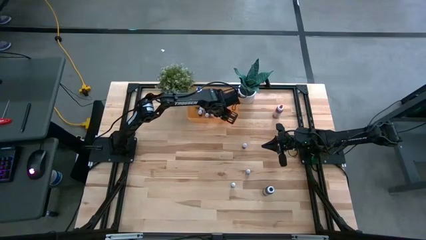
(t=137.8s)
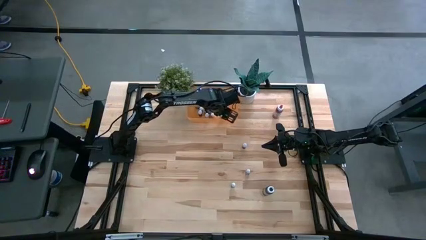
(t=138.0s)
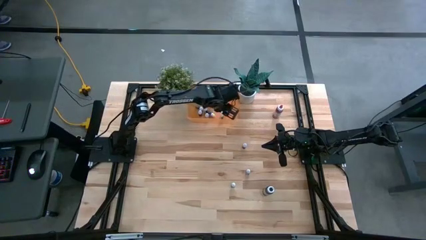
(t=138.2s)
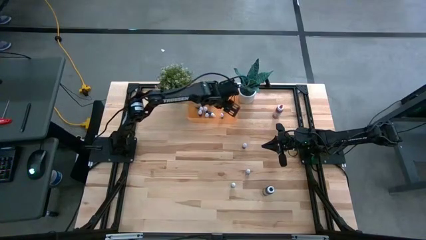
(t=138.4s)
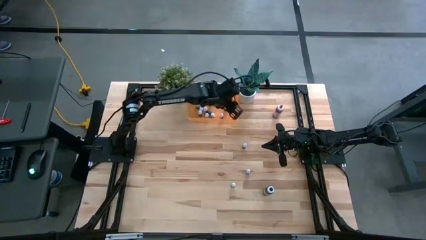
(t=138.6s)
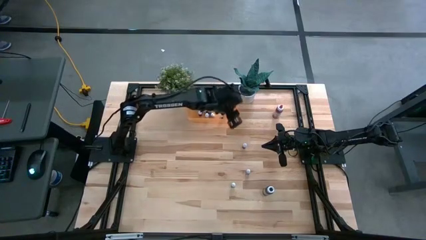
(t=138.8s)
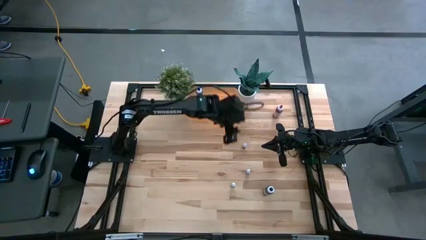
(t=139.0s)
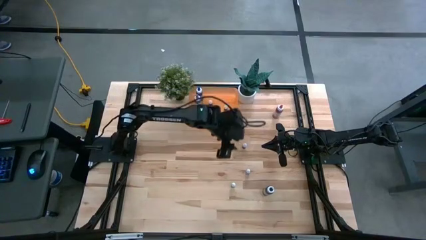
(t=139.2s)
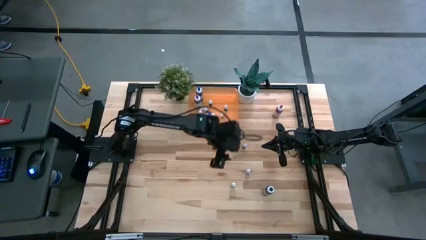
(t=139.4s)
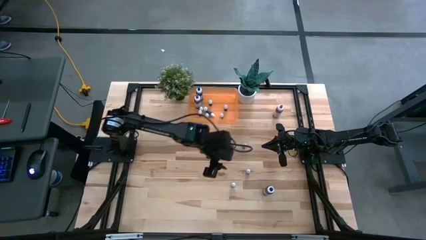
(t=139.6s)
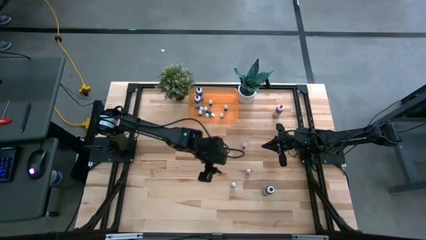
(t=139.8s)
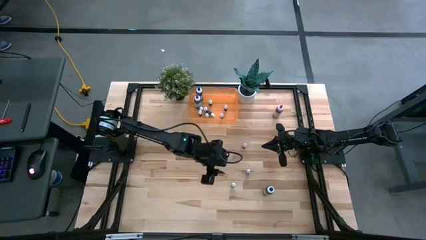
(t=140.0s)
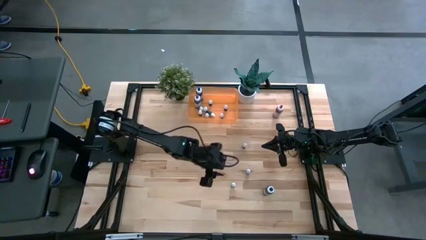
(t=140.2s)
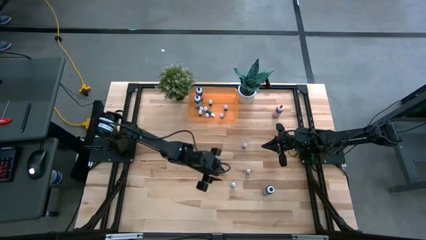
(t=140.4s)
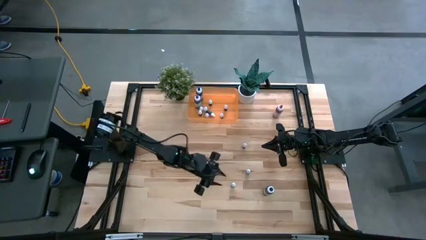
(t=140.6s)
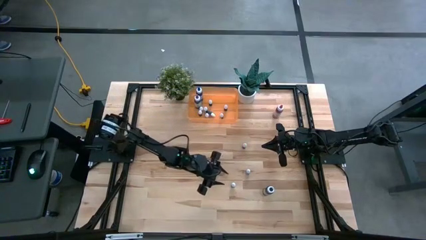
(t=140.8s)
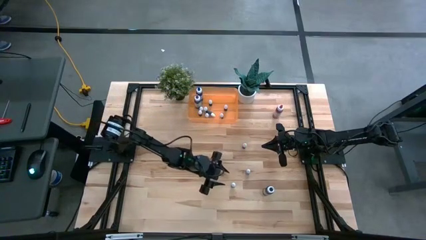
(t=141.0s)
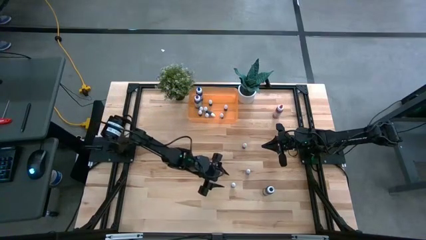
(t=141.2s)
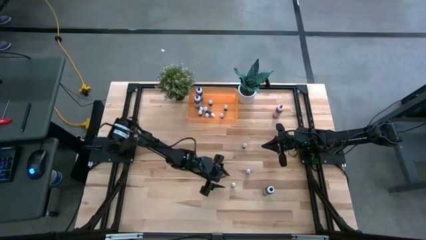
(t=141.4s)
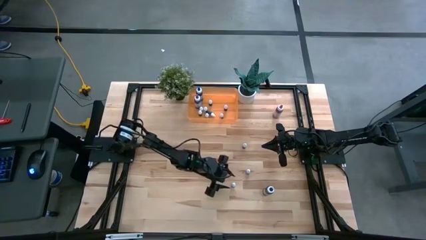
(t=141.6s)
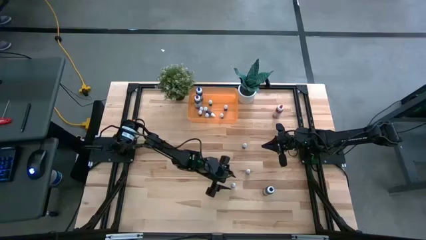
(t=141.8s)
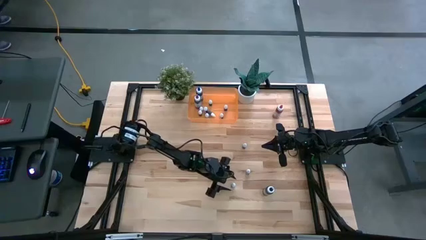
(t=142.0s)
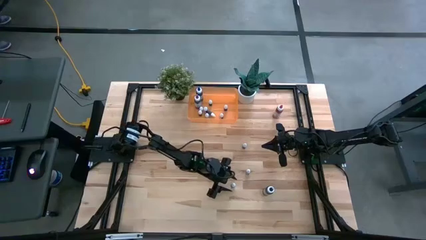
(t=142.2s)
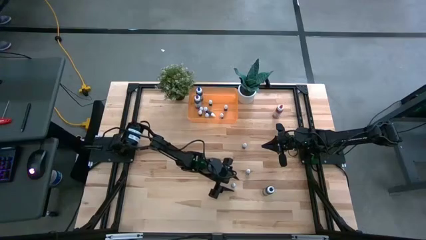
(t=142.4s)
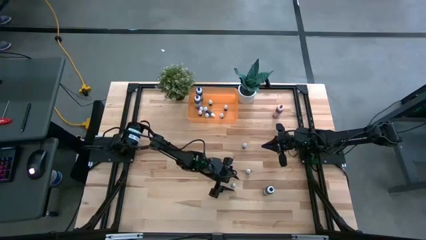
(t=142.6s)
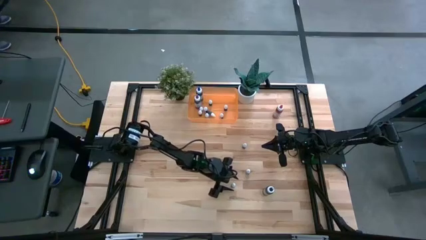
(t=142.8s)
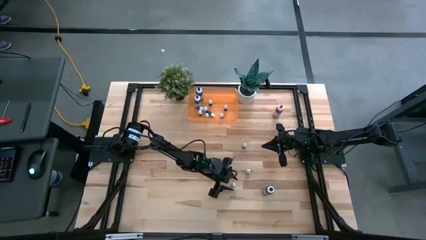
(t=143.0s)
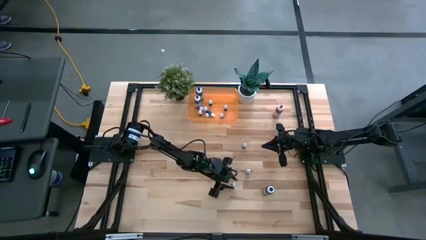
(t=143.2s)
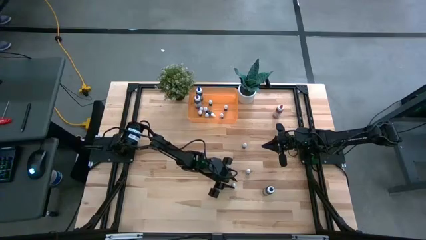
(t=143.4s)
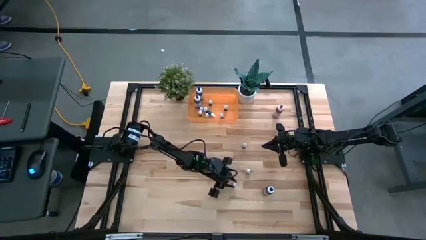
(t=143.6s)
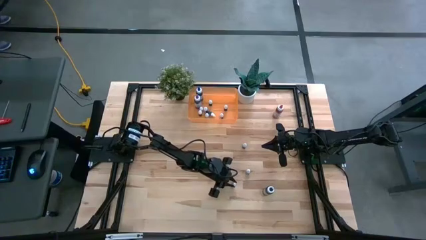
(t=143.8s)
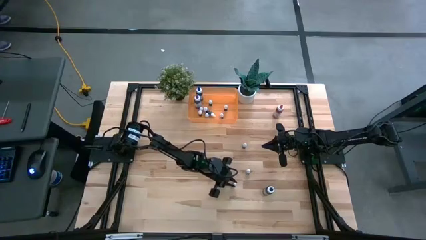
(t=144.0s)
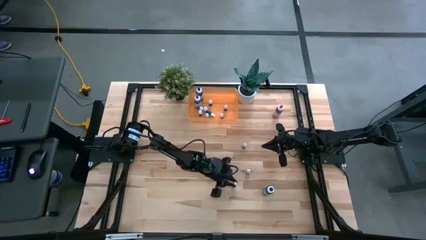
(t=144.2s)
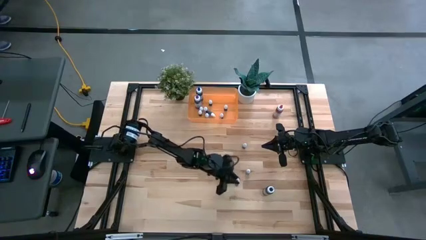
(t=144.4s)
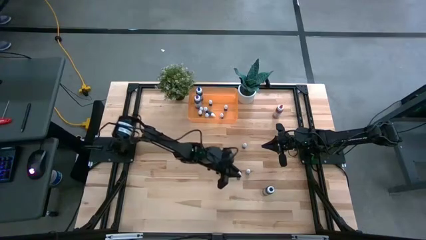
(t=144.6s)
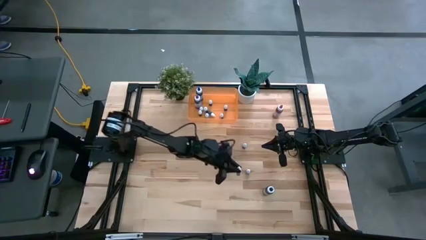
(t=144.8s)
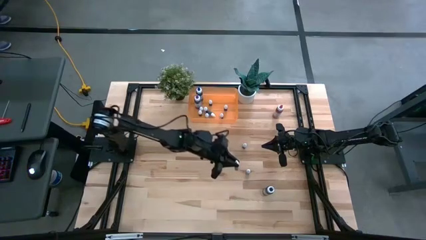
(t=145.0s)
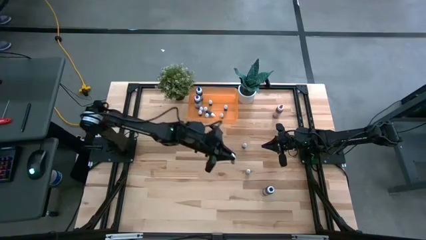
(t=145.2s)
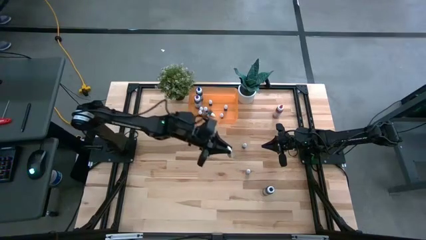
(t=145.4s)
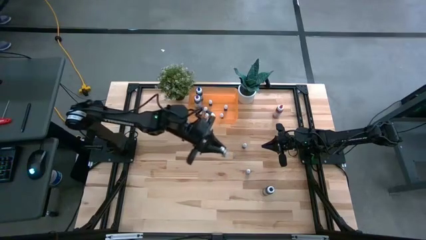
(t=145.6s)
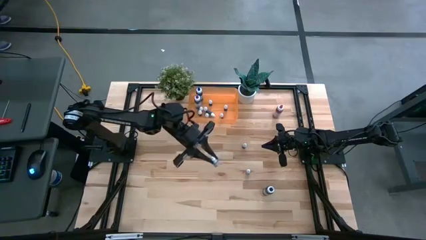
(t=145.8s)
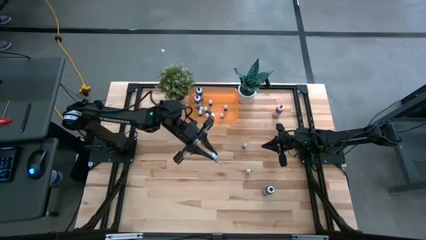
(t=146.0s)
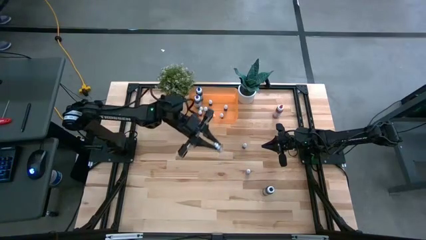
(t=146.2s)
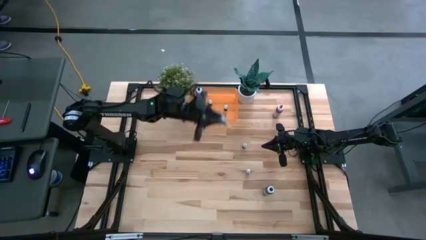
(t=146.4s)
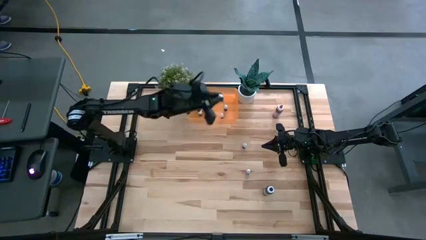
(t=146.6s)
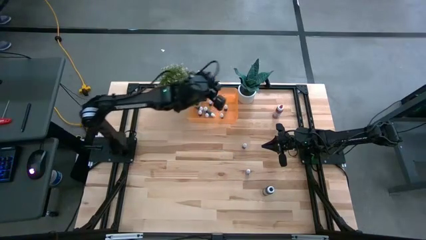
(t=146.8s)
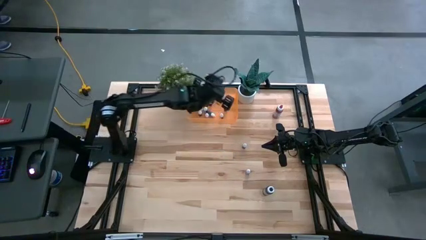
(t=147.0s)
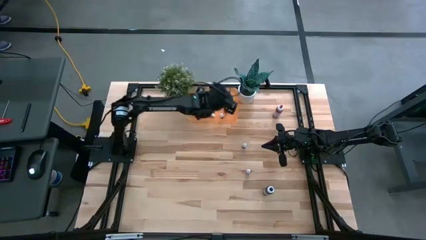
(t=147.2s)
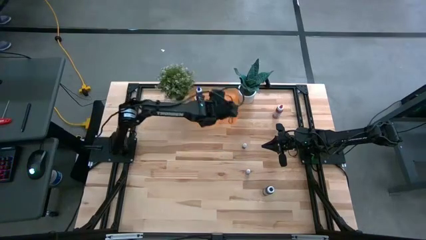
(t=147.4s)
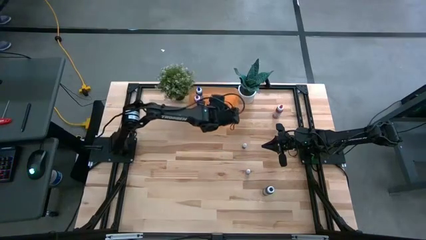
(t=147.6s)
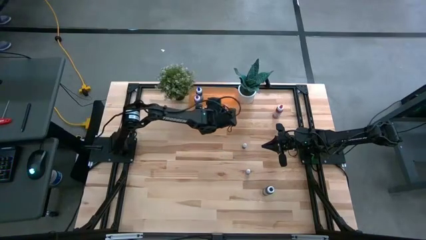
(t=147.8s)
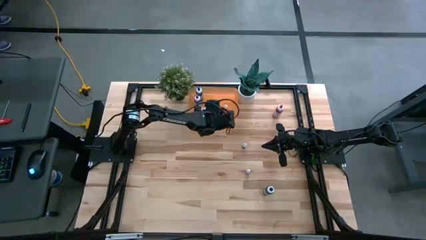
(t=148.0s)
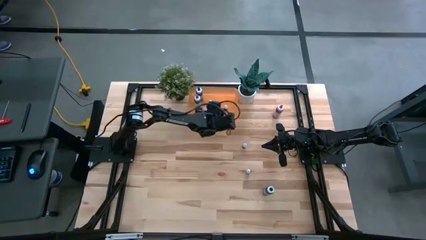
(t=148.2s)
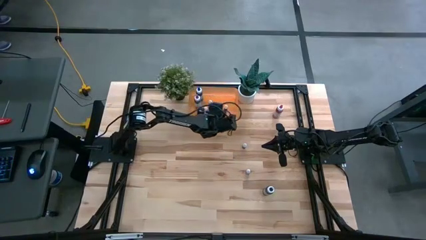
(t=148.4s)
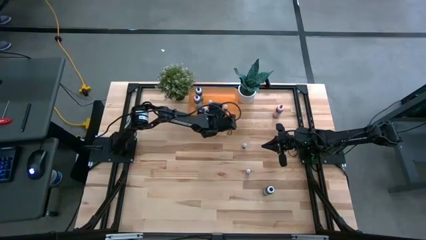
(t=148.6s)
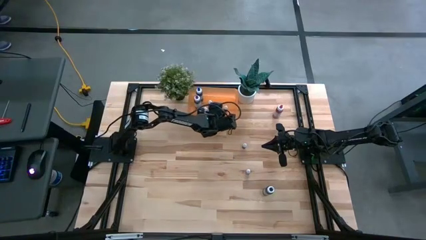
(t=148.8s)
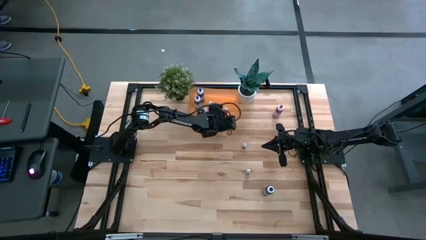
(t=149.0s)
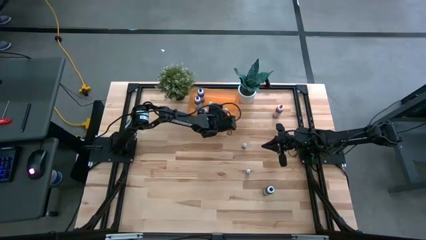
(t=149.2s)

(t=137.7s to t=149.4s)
Task: Pick & Place food coloring
Put the bottom small black bottle into the bin

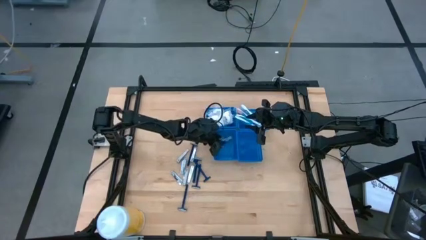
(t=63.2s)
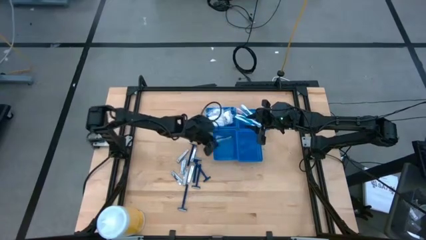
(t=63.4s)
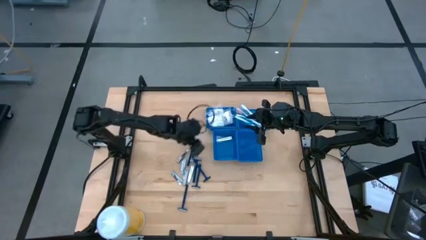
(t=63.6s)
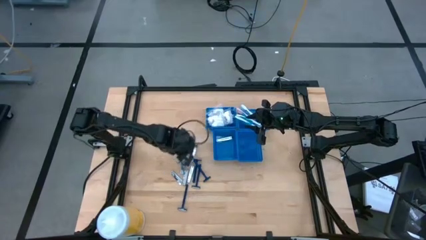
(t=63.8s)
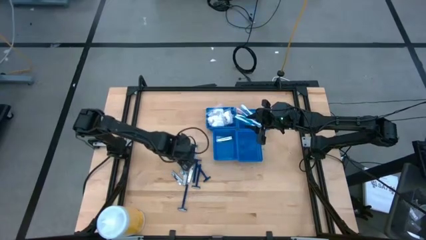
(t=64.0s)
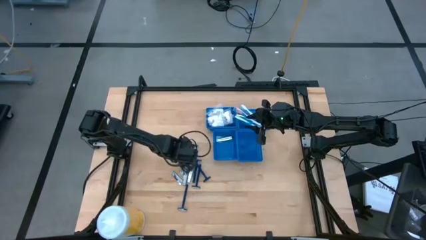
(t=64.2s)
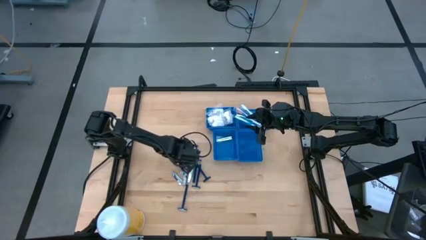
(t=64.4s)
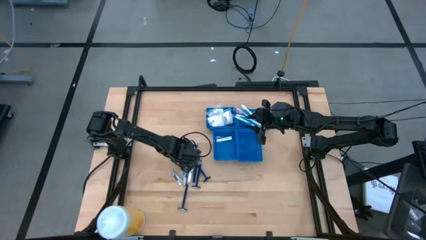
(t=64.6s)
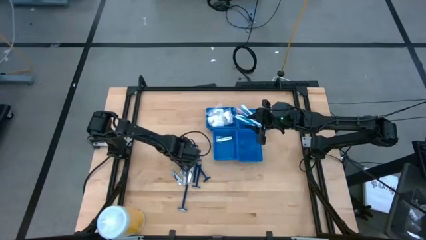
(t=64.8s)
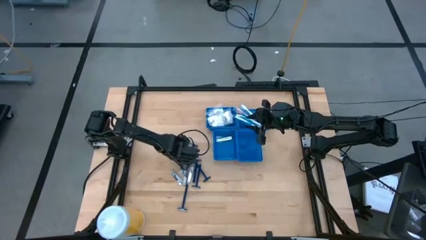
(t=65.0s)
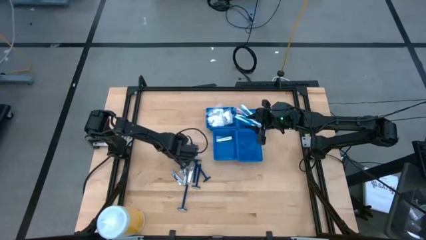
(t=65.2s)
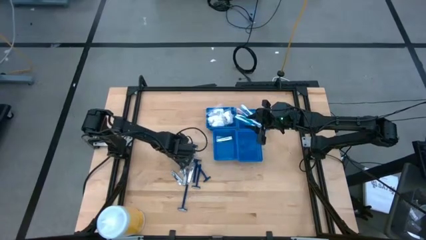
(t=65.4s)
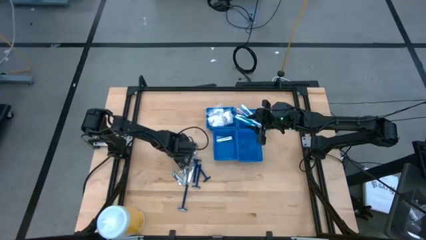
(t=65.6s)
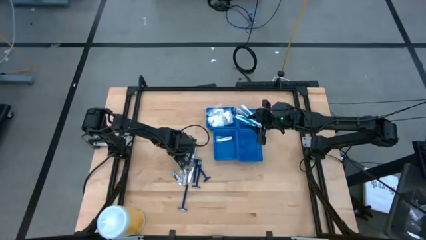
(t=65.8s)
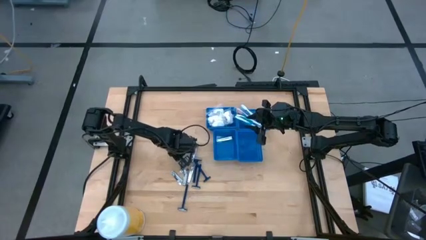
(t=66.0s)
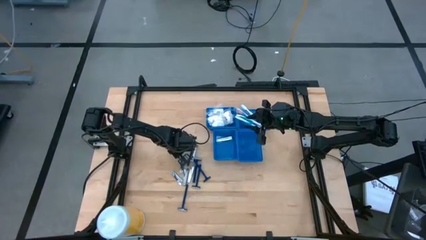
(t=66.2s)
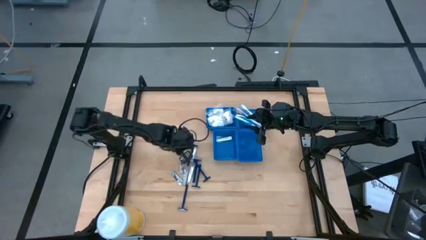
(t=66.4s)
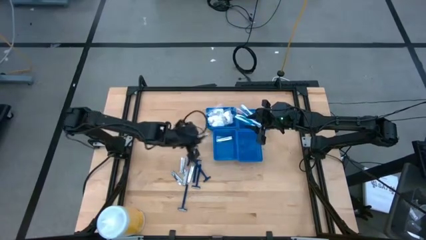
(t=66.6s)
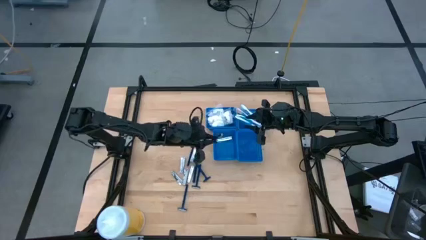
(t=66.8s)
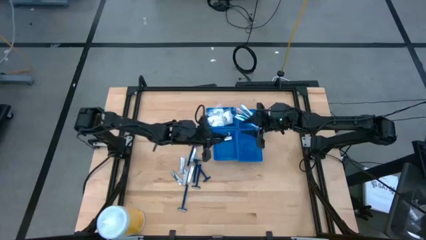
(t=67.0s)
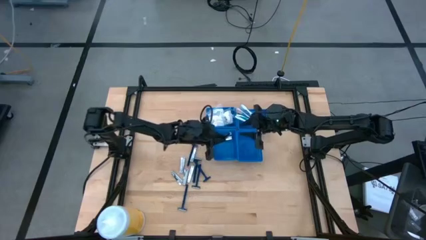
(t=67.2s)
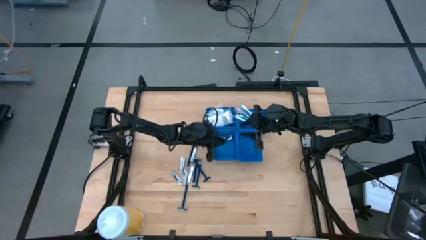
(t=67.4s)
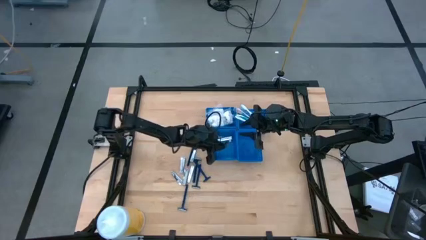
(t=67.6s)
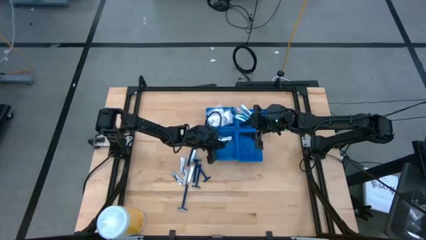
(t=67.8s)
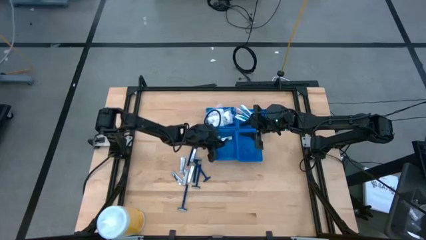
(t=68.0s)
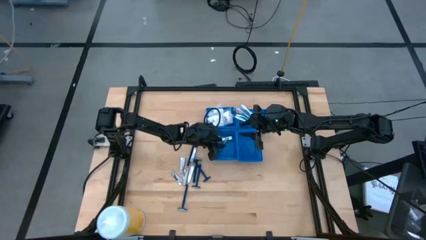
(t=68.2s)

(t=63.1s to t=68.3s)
Task: Pick & Place Travel size toiletries
Put the silver nail cutter into the bottom left blue basket
